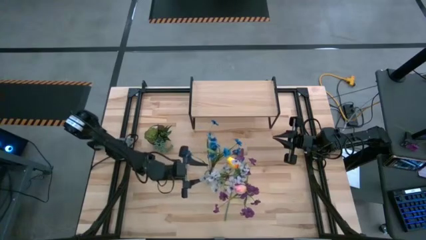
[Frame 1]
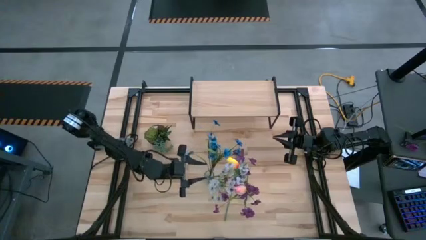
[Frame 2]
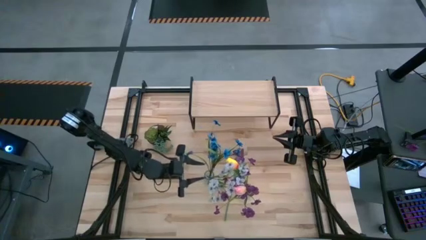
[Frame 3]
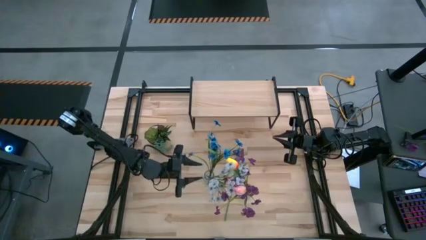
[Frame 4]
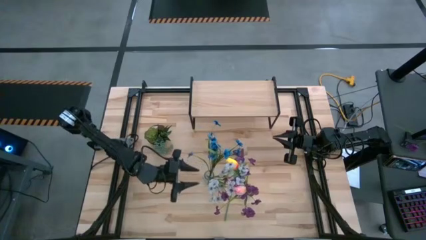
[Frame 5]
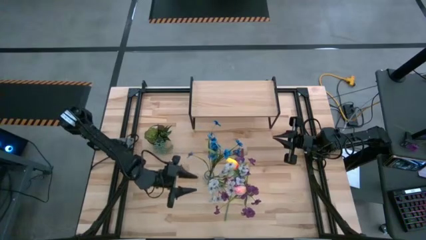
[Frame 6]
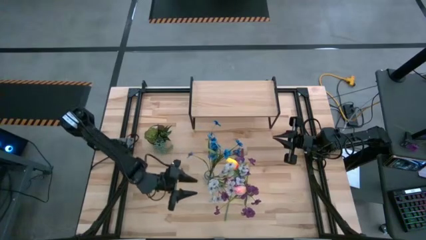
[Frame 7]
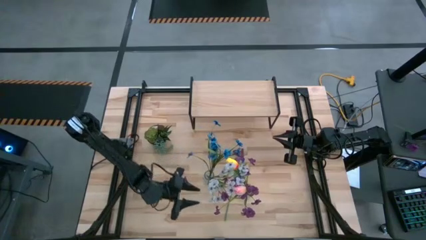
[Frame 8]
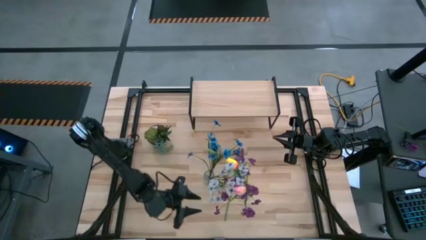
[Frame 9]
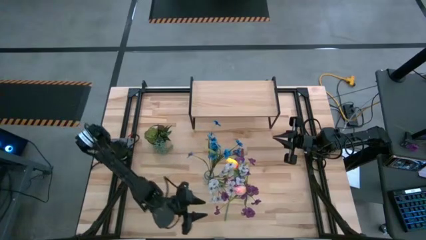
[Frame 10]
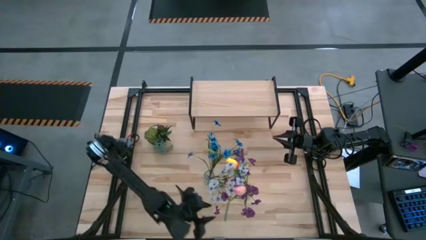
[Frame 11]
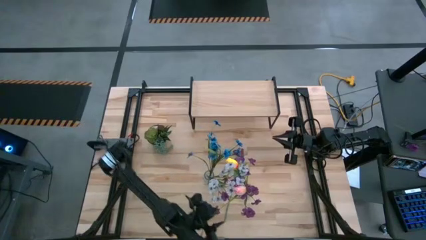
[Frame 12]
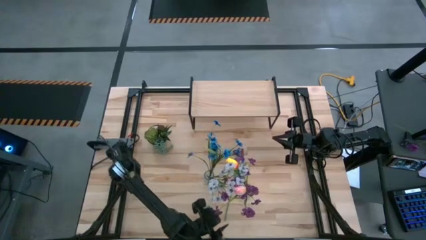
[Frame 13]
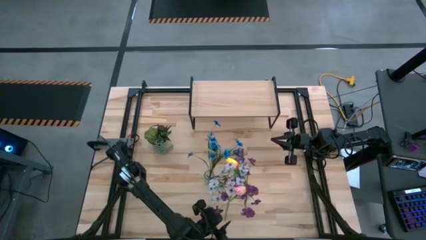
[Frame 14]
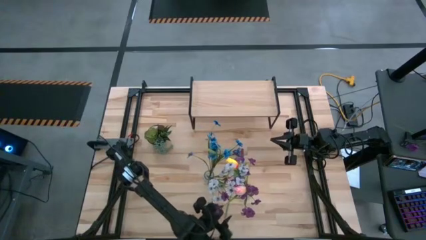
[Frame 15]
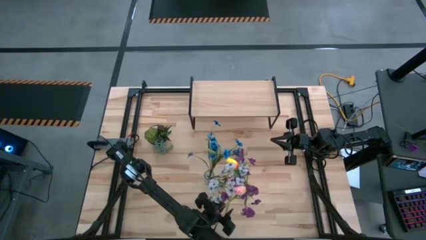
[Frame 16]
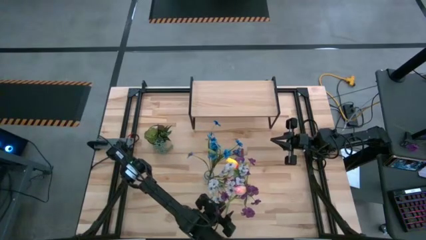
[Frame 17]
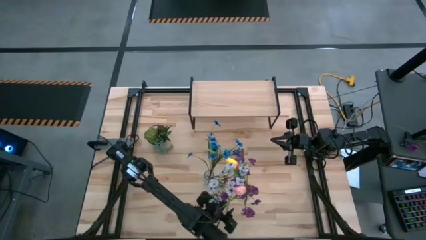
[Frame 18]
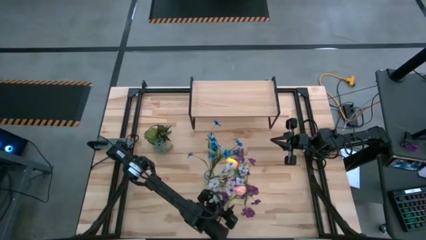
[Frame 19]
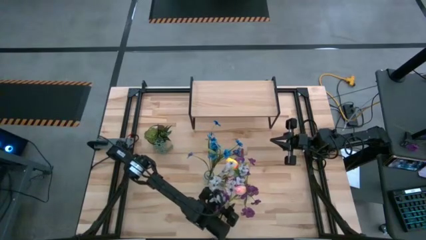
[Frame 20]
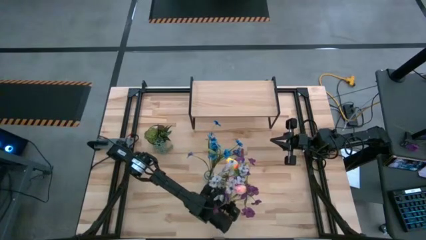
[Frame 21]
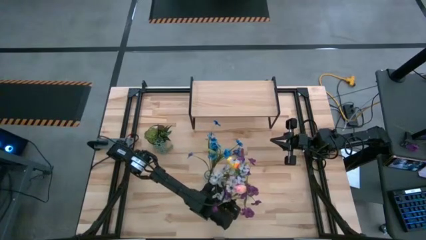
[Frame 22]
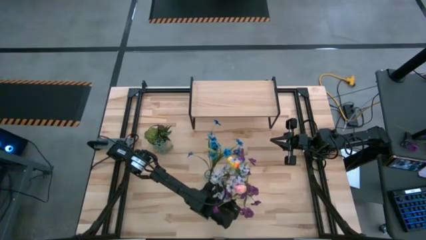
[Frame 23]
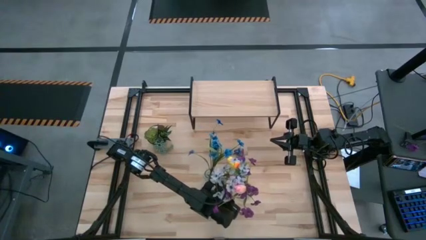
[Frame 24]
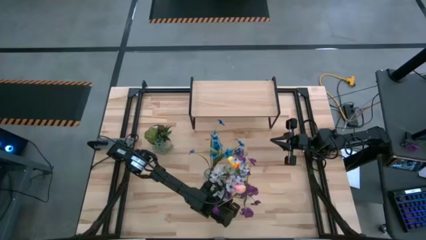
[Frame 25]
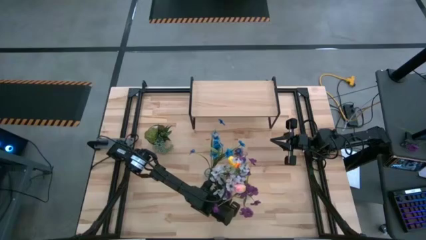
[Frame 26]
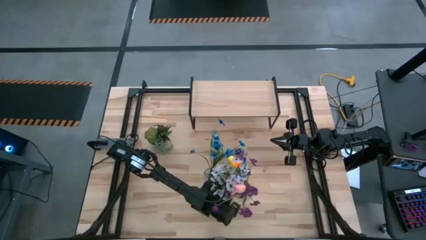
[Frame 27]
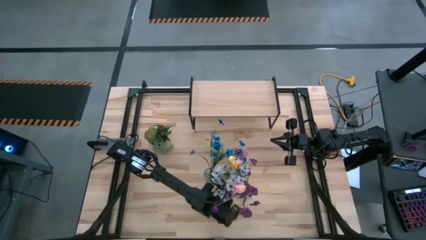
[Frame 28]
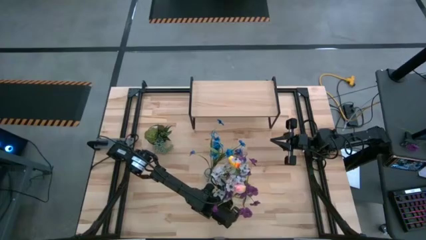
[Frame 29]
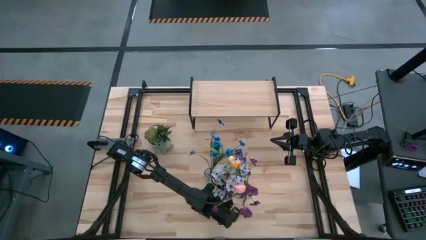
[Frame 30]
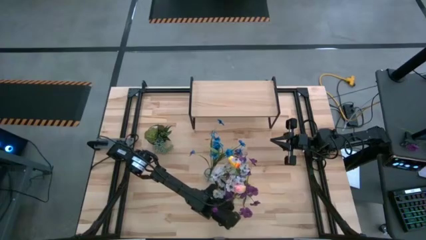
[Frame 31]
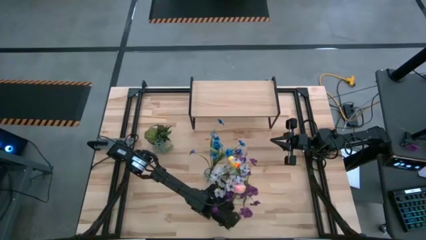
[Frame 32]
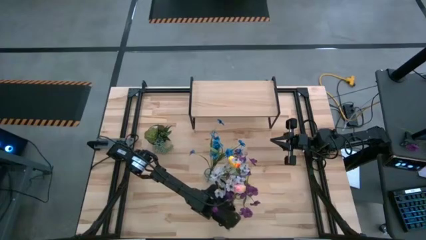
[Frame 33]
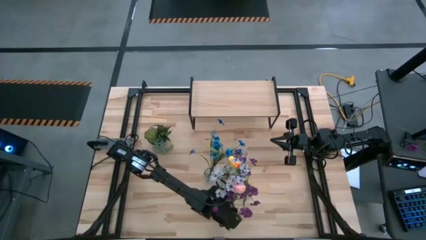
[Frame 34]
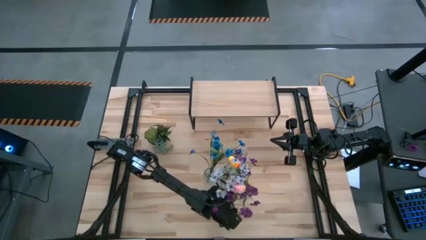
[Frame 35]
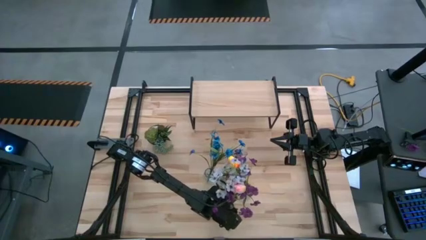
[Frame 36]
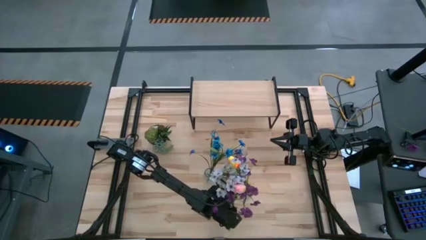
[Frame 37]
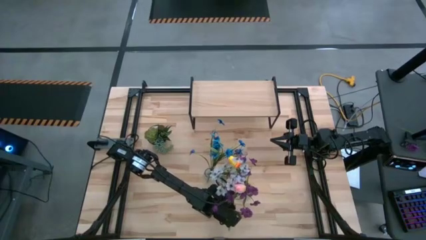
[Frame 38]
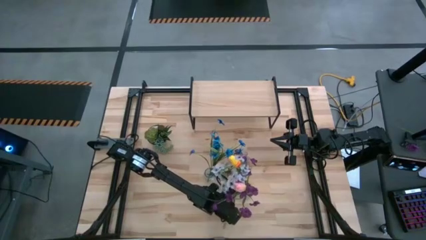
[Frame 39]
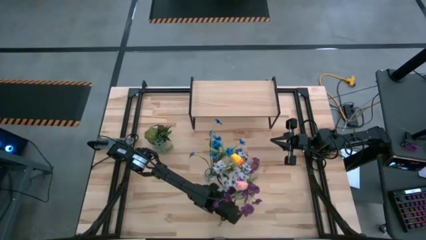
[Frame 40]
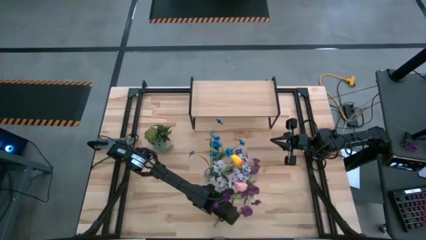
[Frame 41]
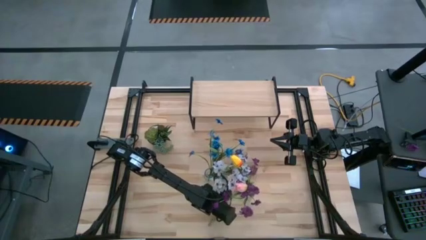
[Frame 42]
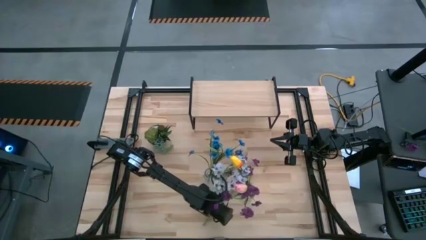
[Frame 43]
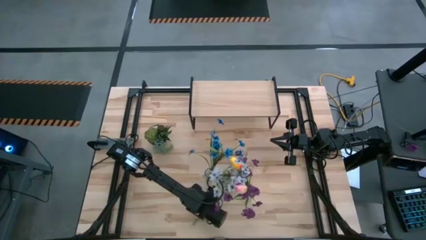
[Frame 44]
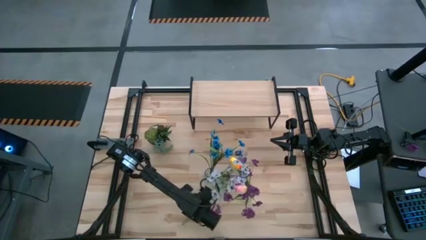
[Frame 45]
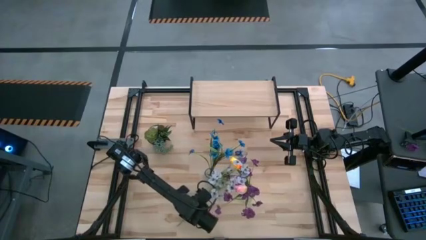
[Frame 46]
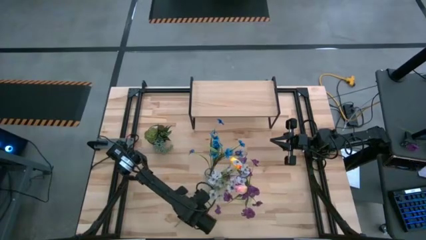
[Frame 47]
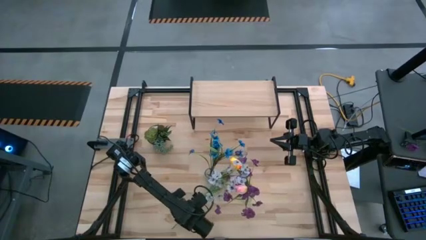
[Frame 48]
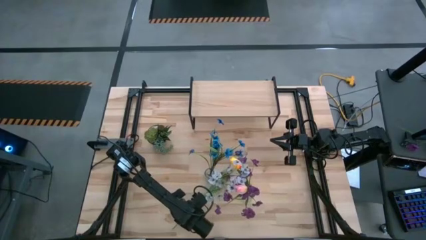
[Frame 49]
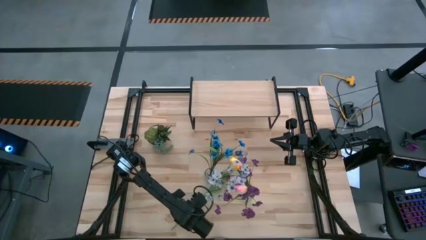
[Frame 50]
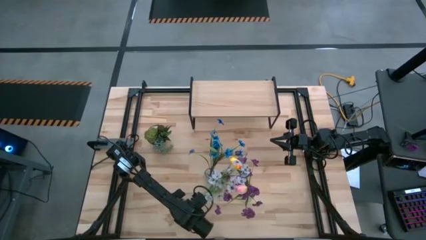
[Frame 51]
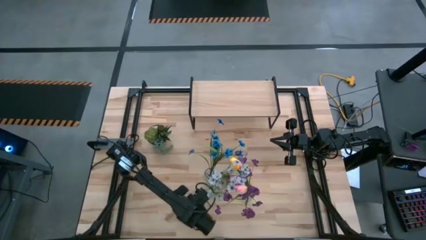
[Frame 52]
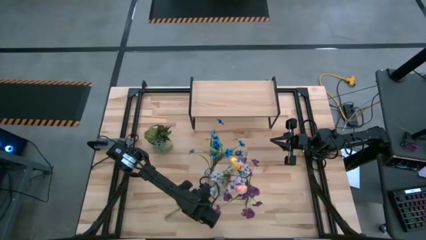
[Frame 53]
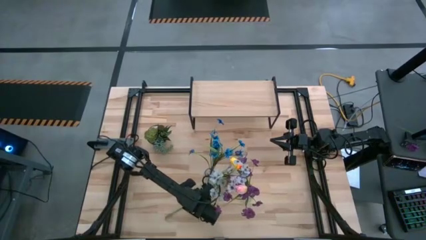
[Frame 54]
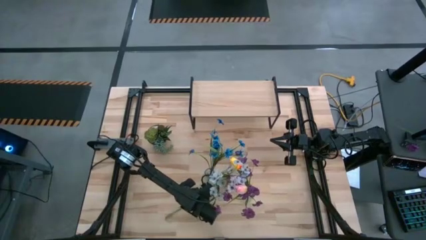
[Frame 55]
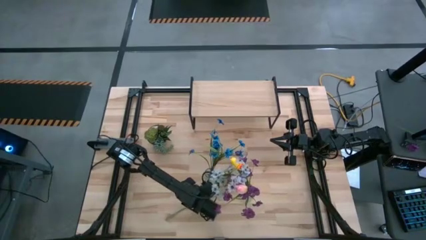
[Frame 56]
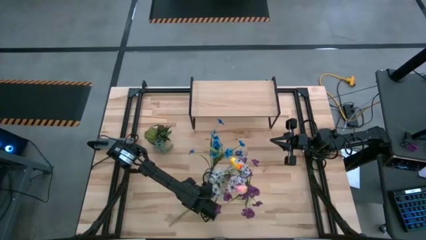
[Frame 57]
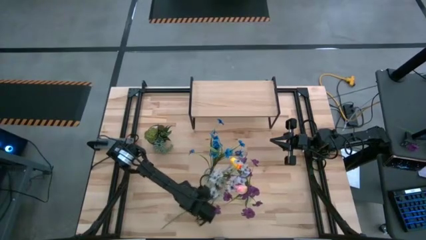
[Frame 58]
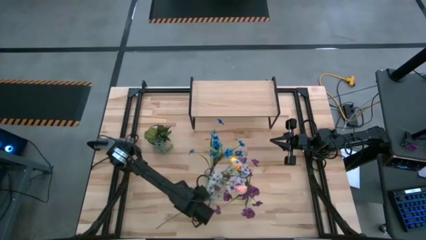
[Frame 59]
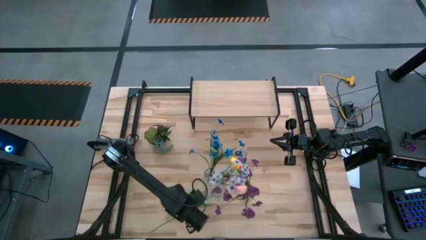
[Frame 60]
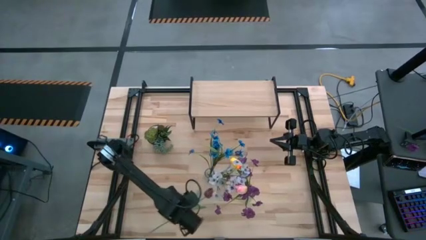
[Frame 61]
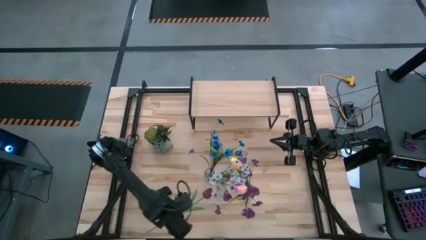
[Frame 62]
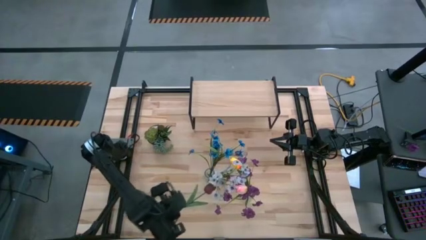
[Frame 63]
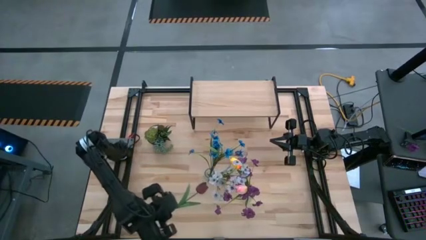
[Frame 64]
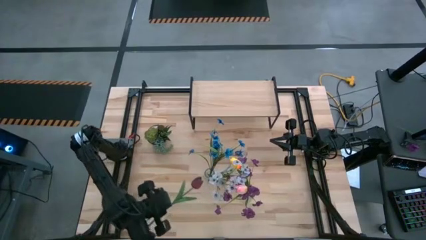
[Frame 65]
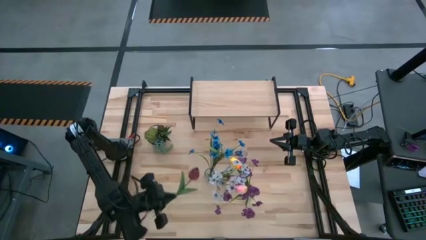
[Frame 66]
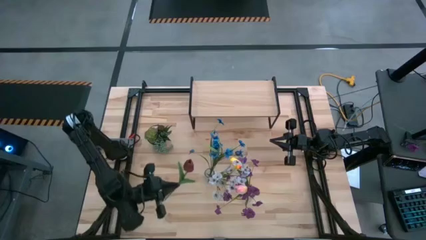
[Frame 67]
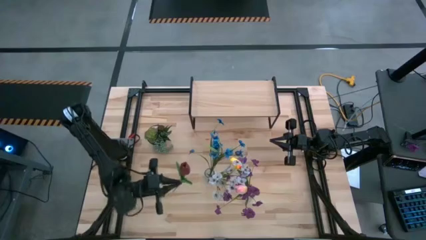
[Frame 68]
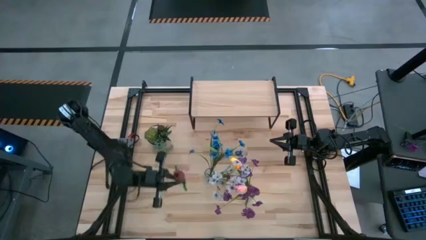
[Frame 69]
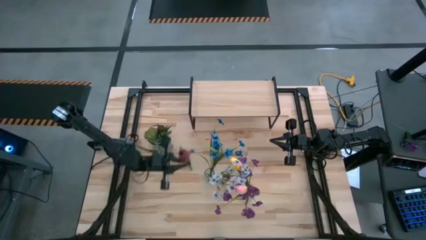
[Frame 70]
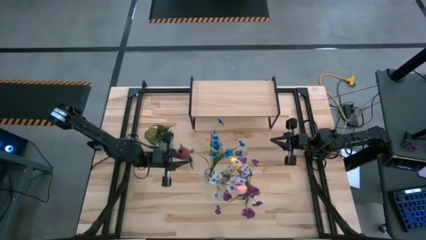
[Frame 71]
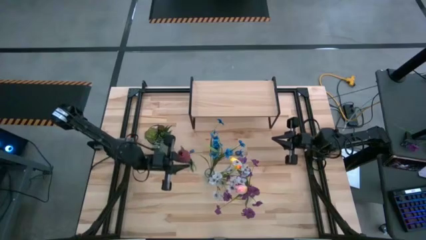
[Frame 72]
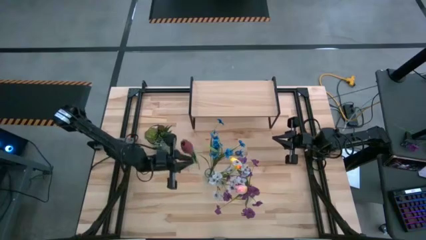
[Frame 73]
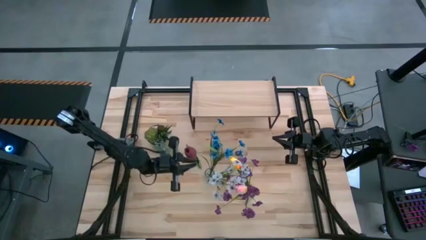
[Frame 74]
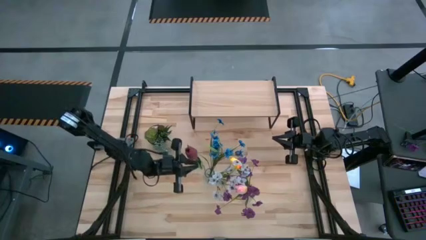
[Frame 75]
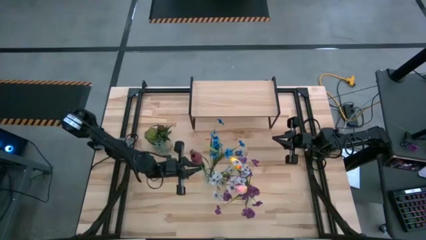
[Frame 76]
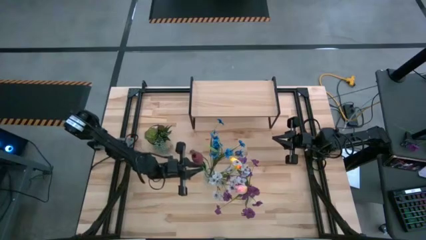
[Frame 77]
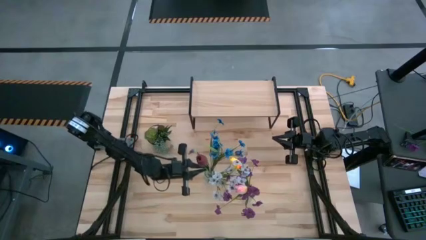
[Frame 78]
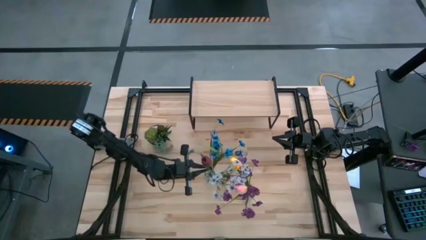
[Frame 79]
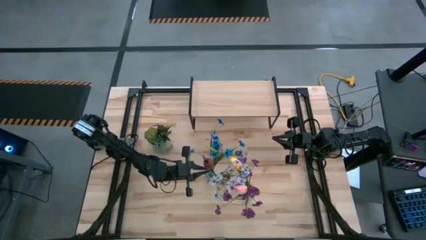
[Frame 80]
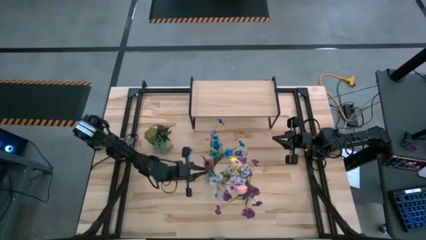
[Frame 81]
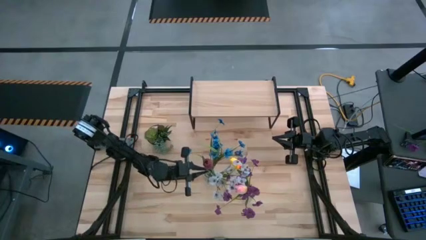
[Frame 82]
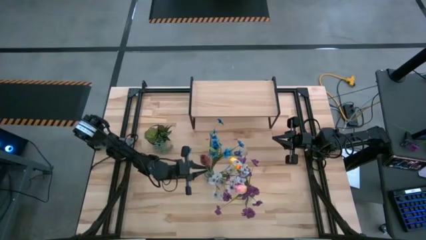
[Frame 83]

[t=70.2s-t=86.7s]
Task: Pick and place flowers into a vace then onto a shelf
Put the red tulip into the left transparent vase
